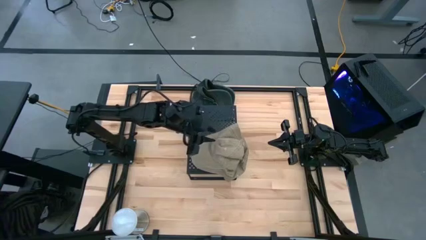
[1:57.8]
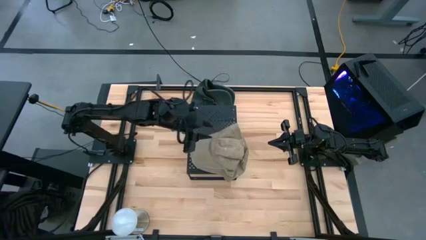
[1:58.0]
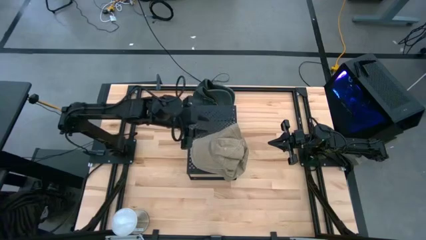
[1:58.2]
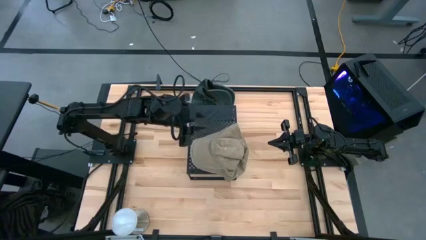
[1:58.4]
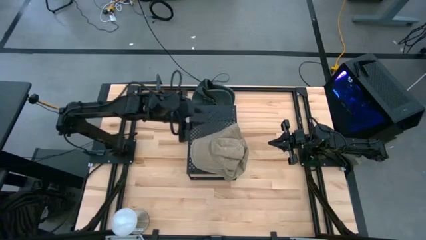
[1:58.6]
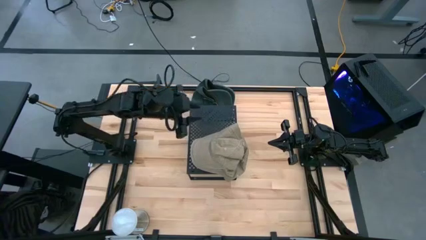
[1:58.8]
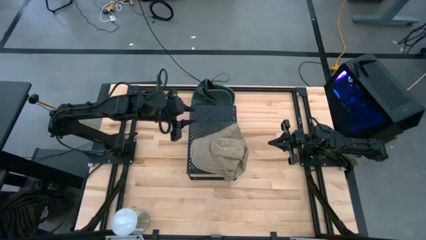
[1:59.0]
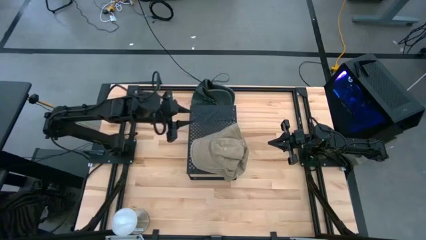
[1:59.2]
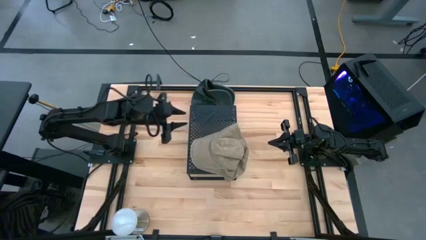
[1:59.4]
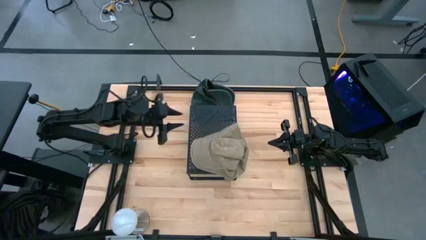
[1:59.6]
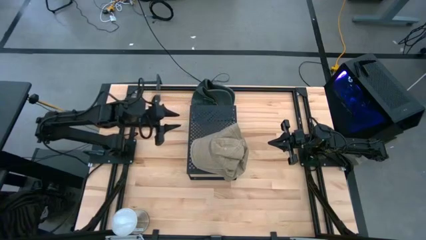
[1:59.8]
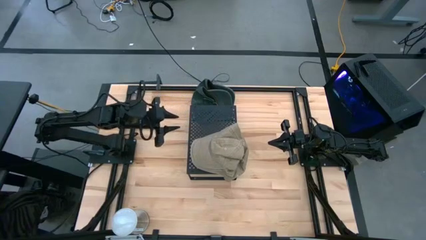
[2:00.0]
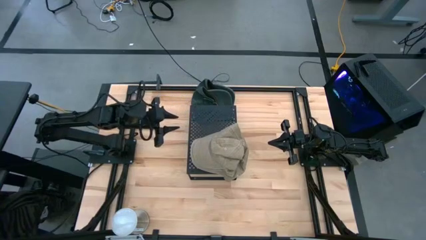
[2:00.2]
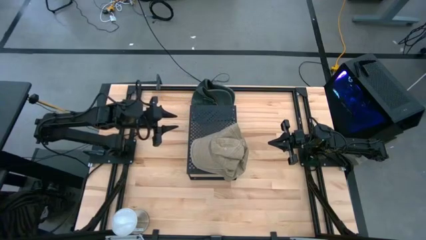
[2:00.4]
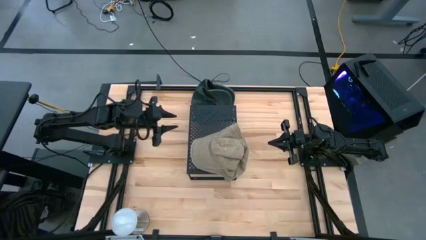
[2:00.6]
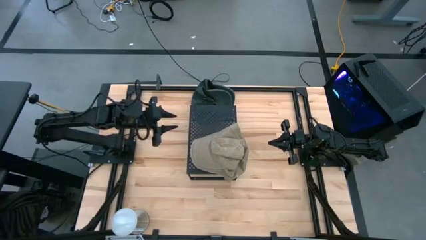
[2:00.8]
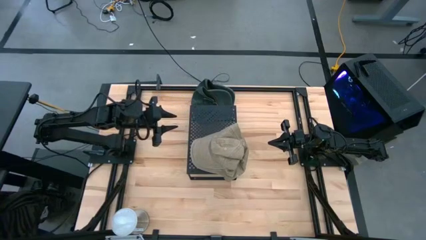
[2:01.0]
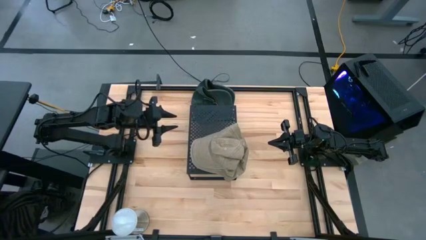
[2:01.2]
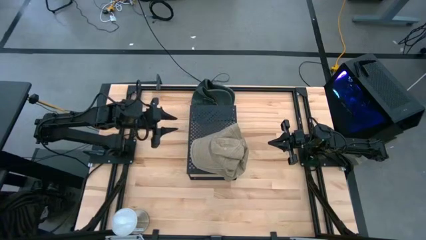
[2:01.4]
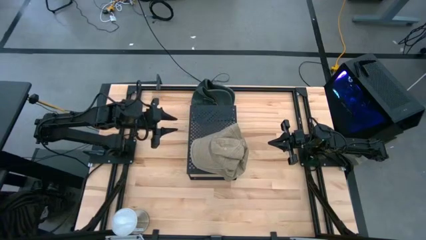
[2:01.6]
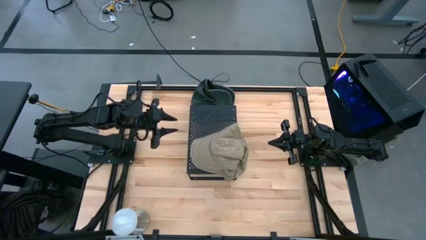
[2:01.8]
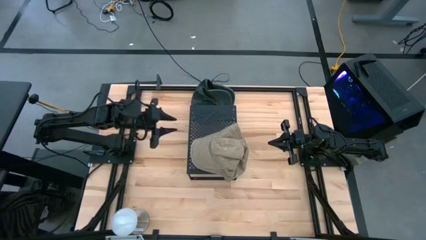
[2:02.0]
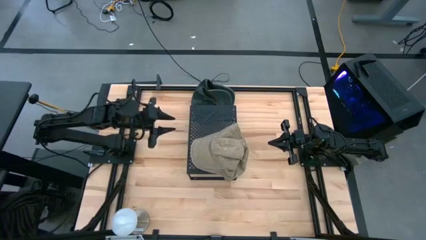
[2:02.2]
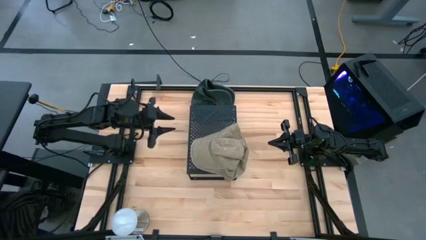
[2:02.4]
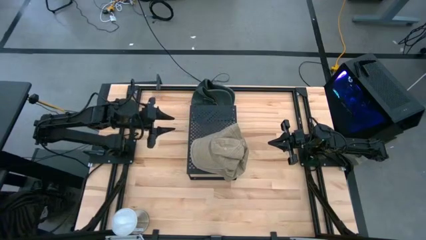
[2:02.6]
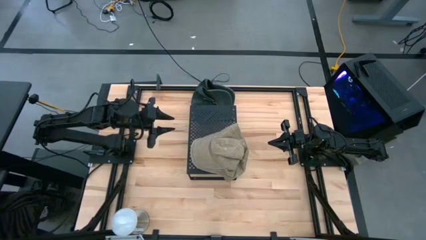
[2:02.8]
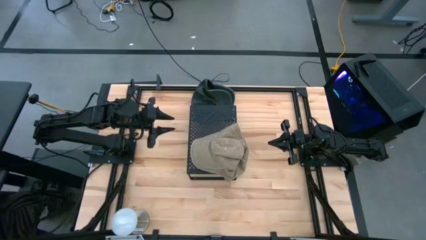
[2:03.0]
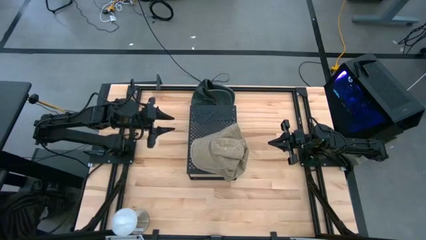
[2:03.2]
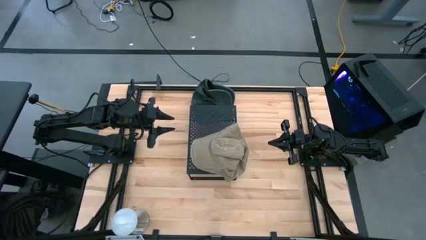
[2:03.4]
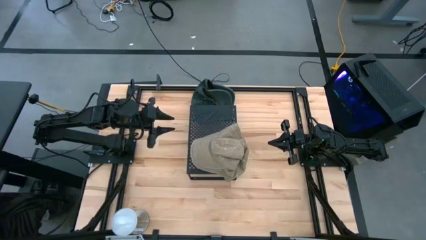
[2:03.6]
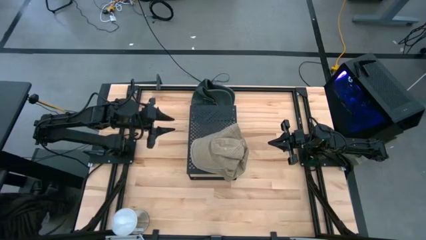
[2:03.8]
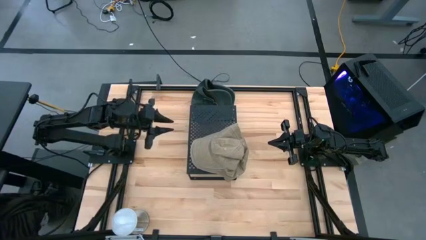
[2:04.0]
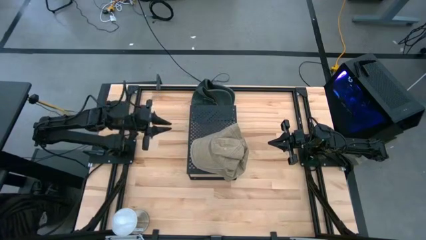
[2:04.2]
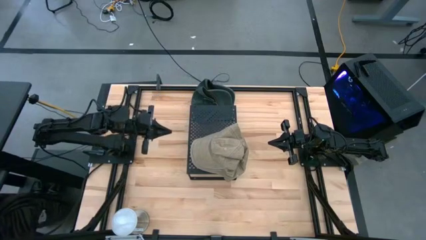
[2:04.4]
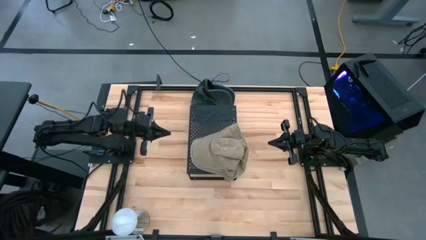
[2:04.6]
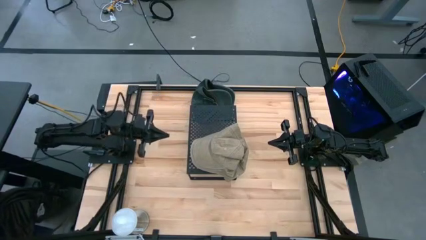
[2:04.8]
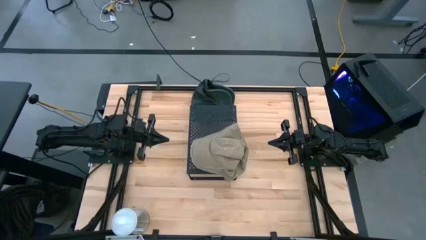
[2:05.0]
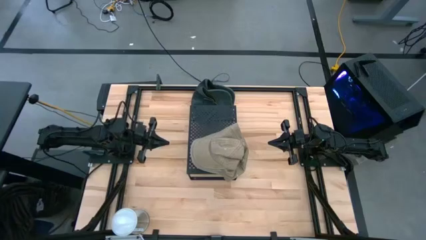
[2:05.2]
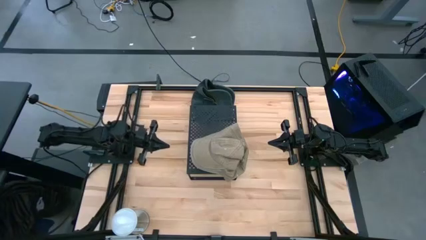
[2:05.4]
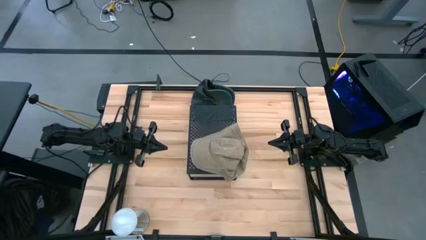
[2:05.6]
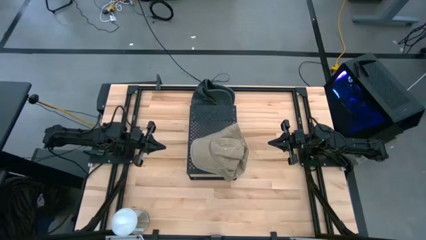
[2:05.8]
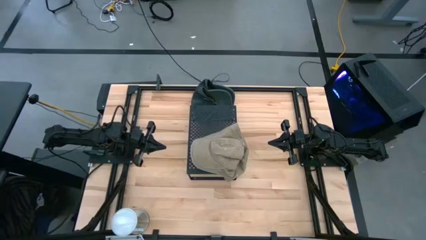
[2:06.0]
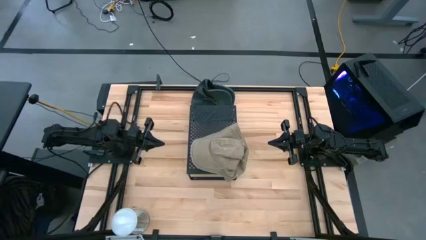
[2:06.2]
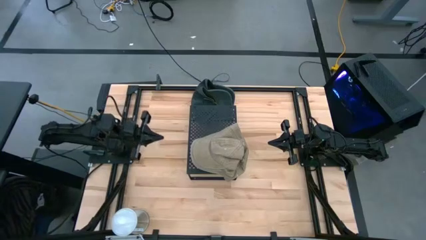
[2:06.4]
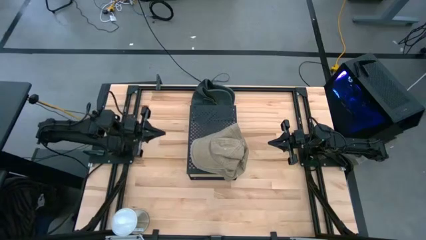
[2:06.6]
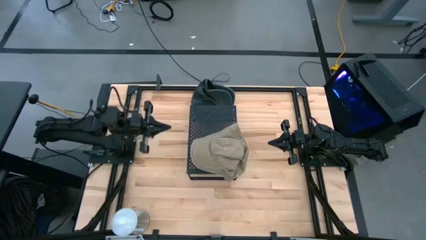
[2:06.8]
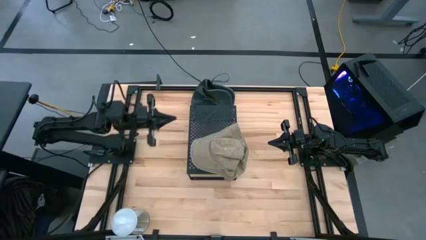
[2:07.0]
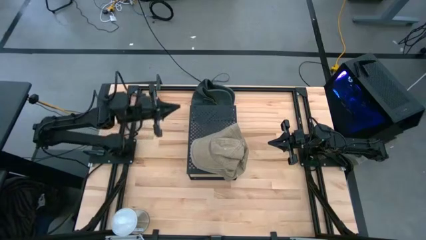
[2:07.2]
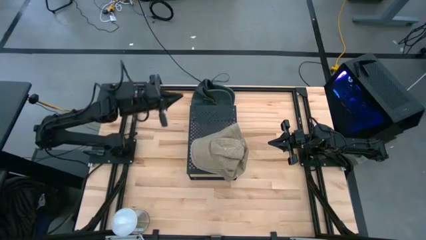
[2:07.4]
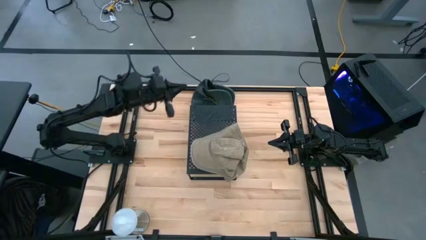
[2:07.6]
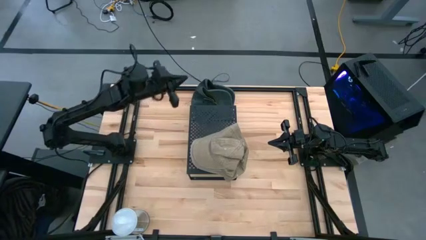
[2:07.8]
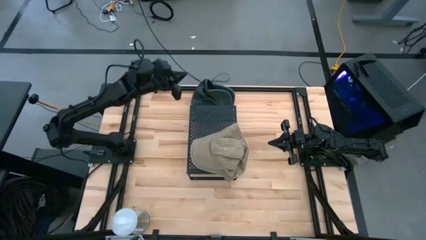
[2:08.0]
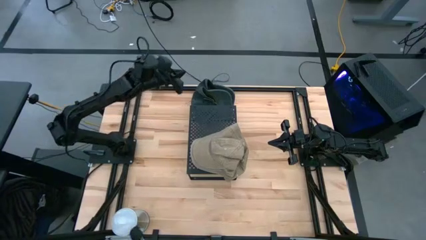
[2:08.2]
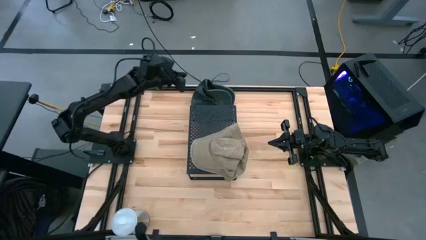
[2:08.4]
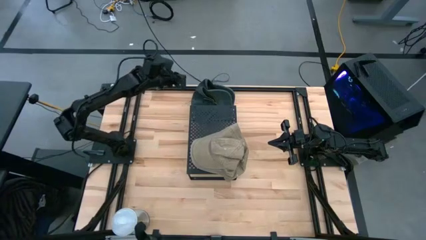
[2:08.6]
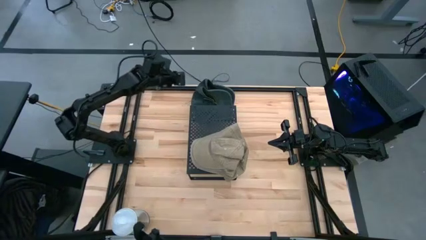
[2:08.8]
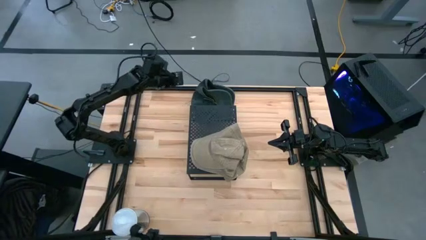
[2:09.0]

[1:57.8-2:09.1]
Task: Pick & Place hat
Put the bottom gray cap on the shelf
